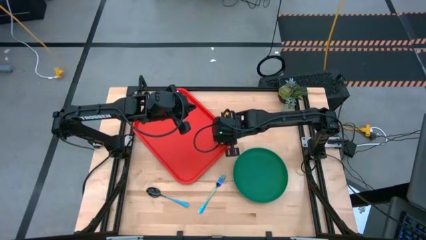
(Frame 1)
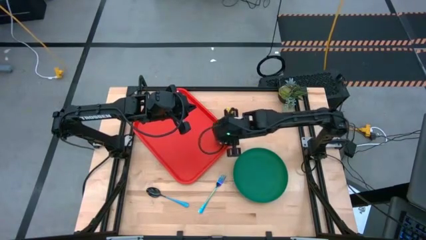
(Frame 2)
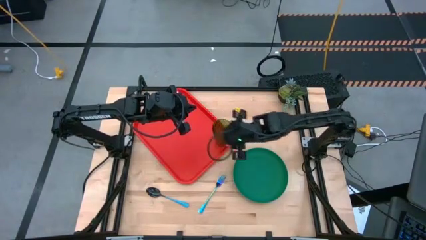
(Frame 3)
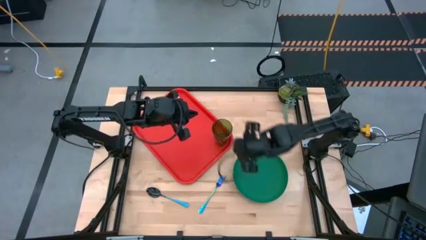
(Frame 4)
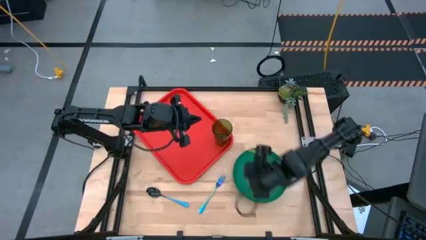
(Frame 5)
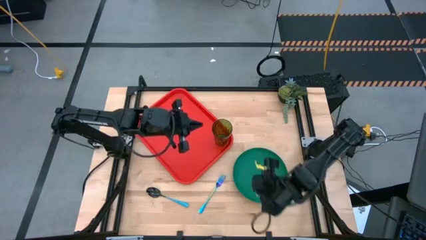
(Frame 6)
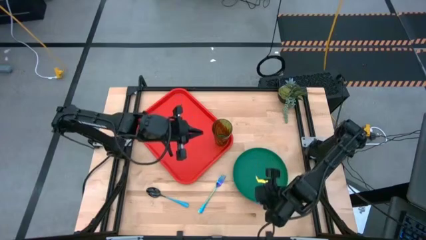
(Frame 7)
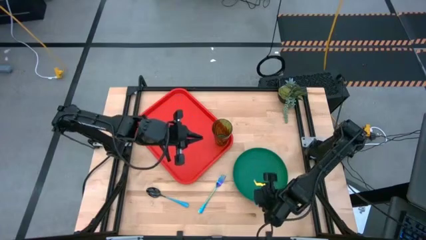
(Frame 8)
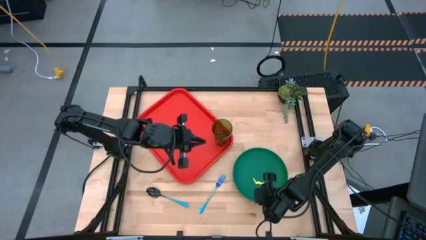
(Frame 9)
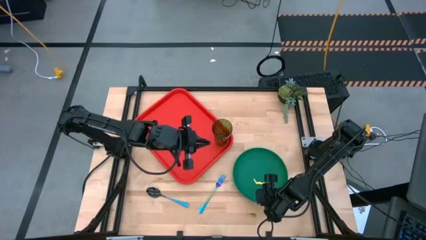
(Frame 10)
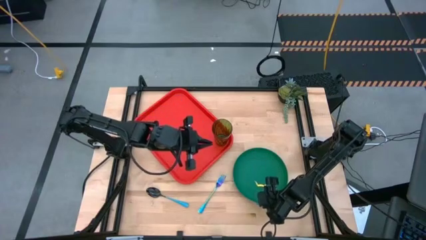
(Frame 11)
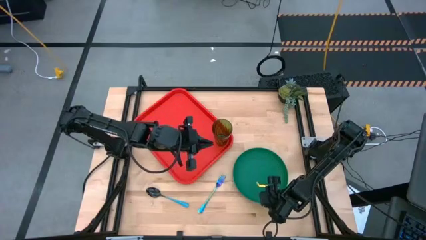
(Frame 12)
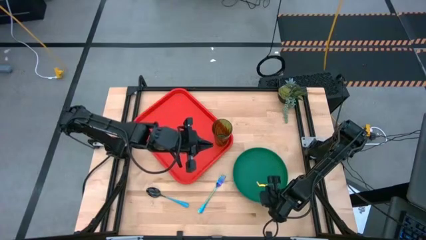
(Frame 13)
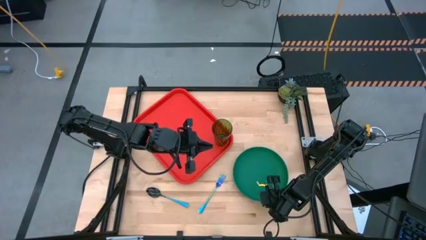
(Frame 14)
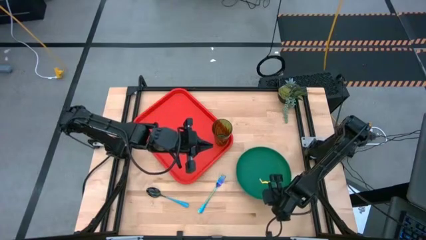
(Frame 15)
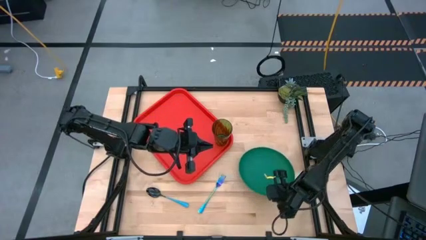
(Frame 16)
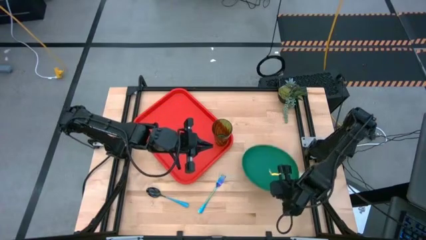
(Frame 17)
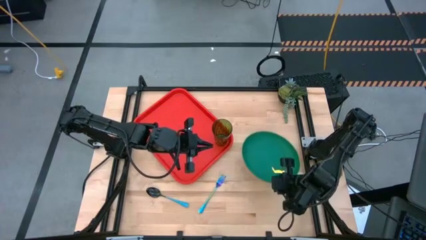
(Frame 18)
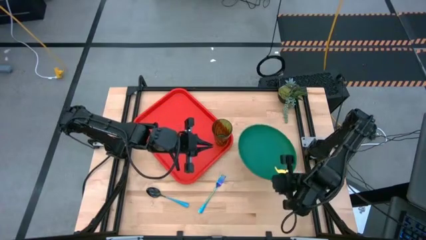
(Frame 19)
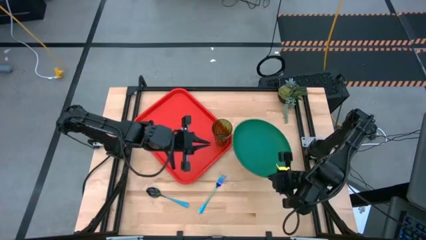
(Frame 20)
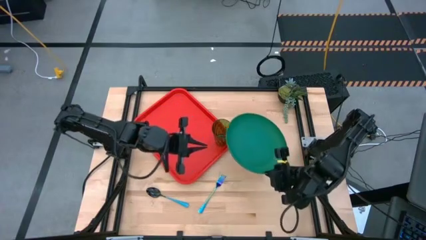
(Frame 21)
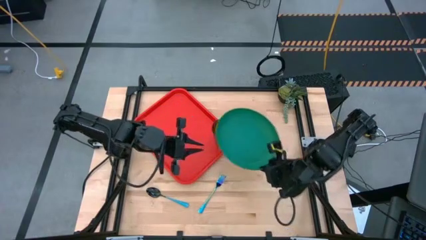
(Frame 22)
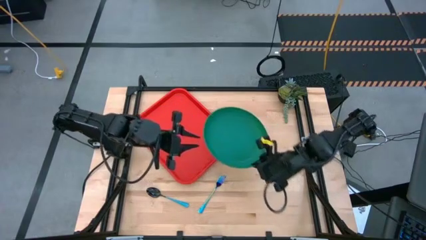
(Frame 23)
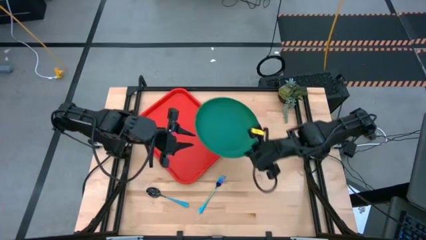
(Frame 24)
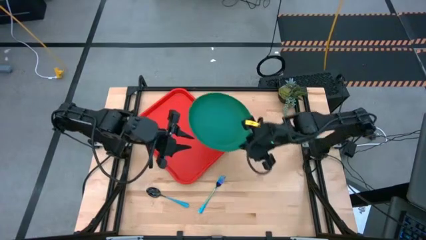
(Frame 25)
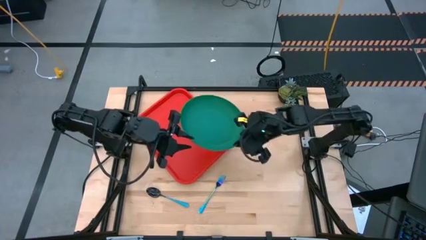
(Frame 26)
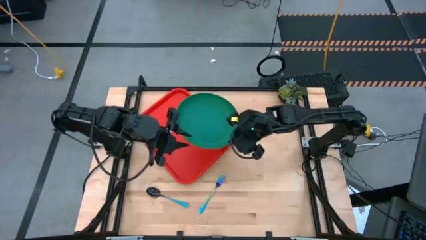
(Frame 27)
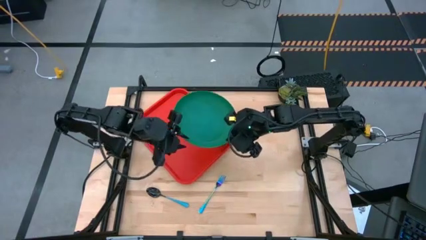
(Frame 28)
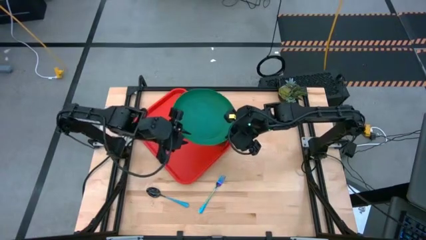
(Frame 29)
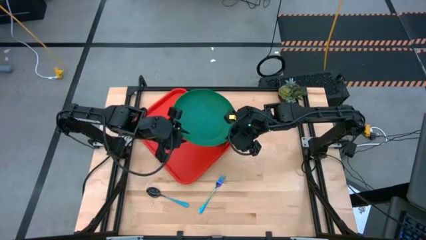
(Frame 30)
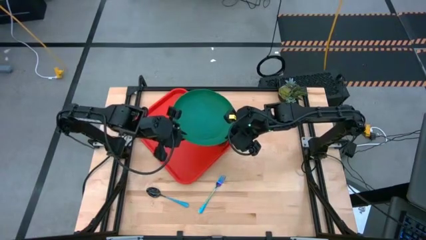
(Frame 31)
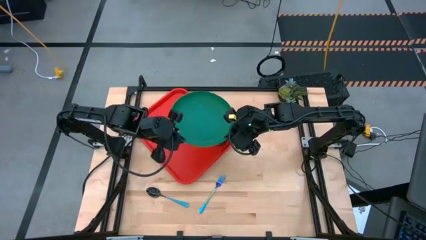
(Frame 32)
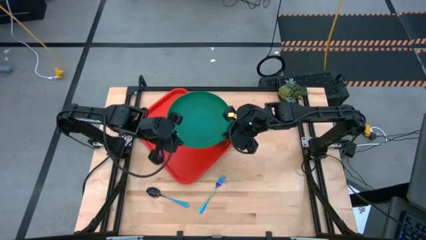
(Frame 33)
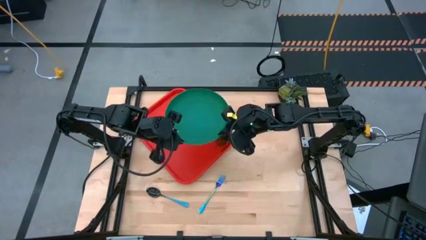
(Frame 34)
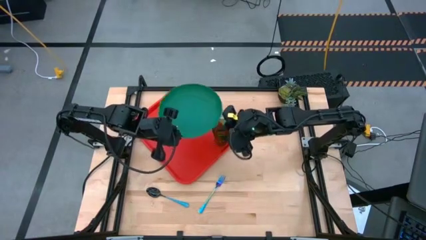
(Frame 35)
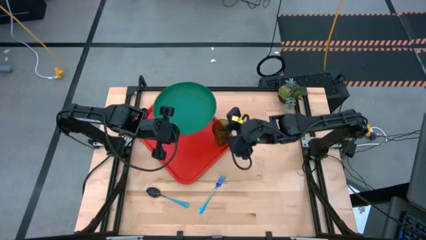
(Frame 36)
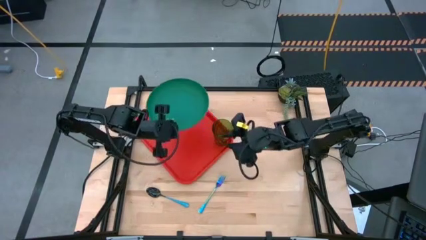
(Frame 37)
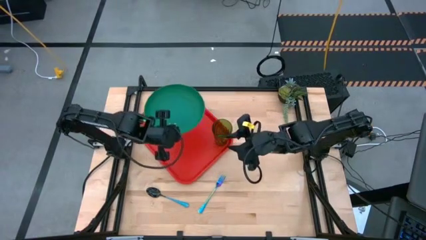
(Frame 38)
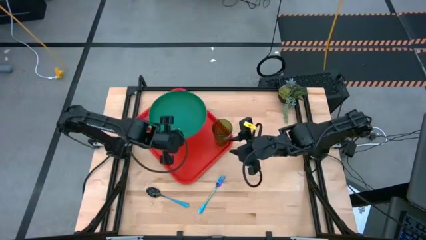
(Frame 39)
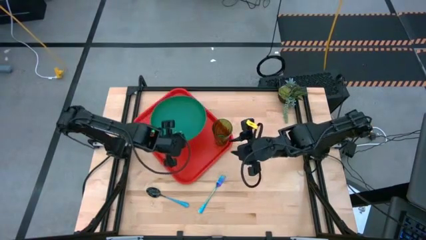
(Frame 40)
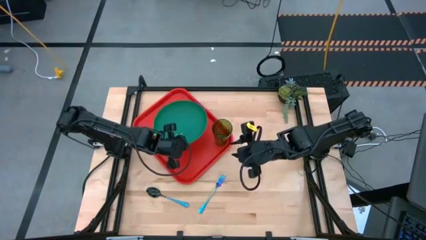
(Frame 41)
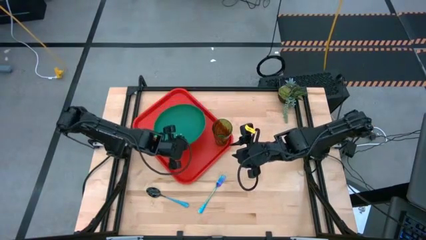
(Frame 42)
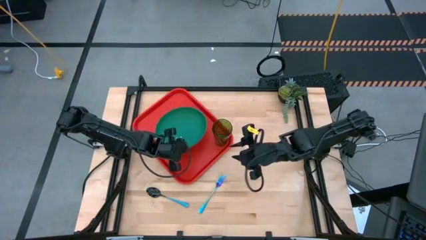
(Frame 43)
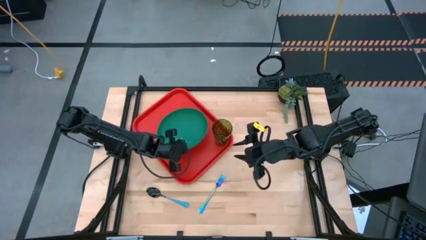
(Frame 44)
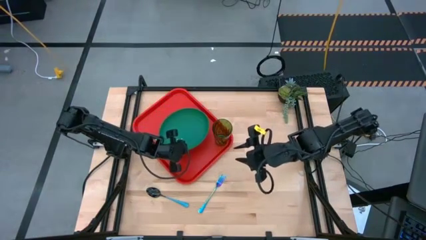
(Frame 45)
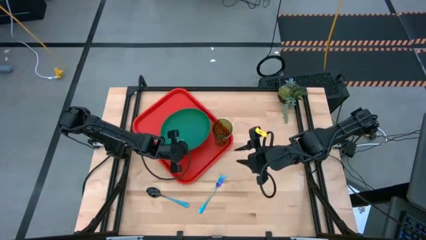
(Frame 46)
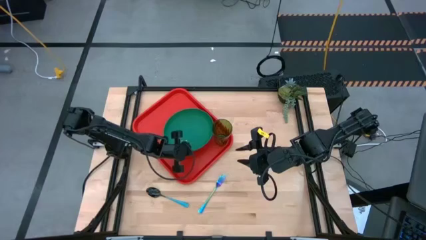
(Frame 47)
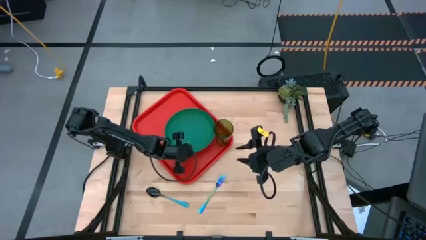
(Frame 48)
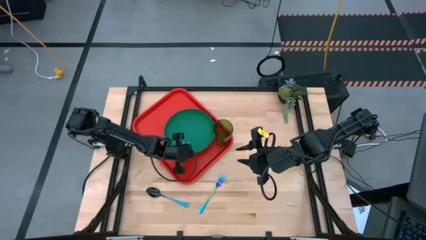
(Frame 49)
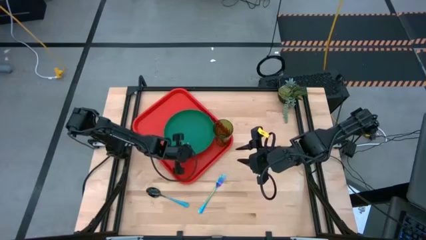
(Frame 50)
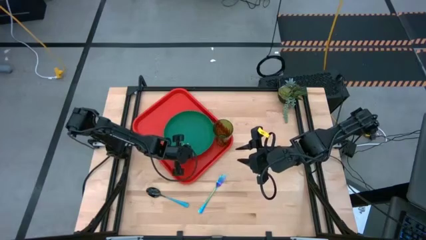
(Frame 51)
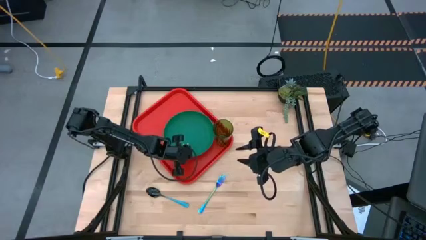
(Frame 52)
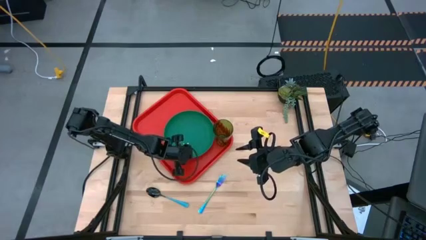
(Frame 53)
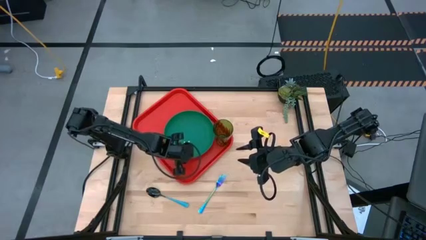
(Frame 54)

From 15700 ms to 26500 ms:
Task: Pick and place plate/cup/fork/spoon on tray
Put the green plate on the red serving tray to the left of the green cup

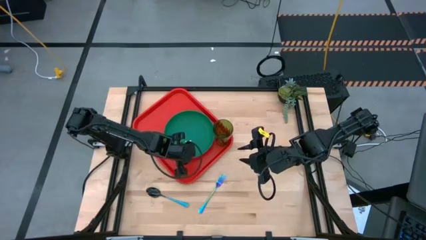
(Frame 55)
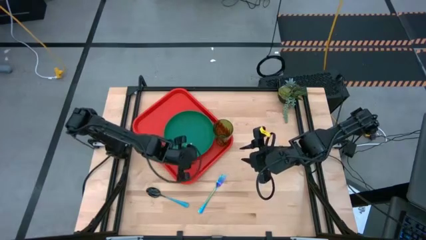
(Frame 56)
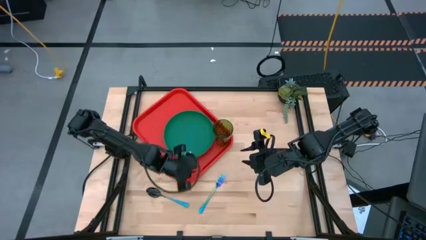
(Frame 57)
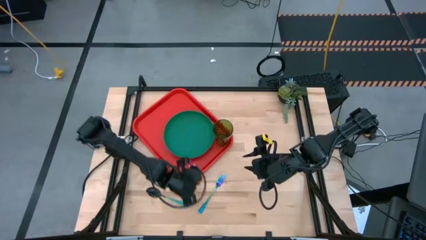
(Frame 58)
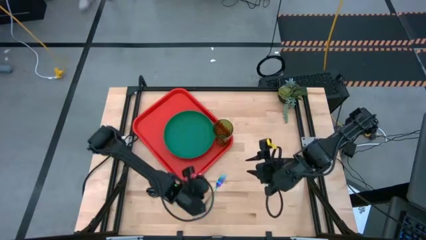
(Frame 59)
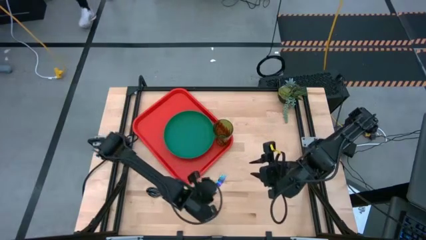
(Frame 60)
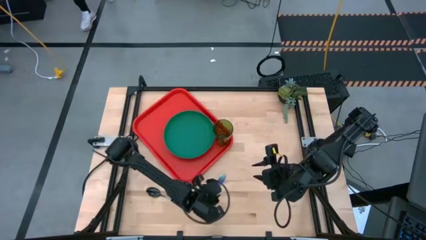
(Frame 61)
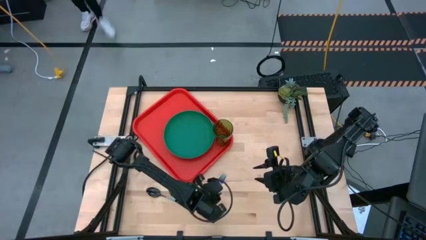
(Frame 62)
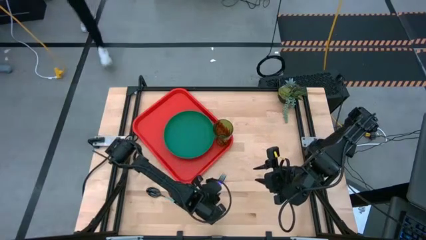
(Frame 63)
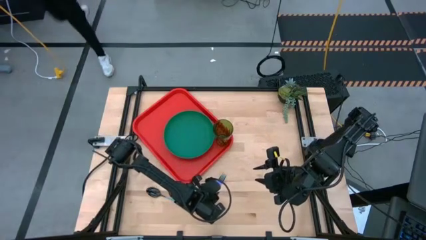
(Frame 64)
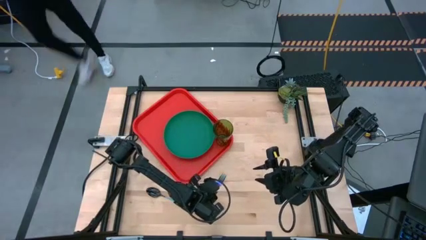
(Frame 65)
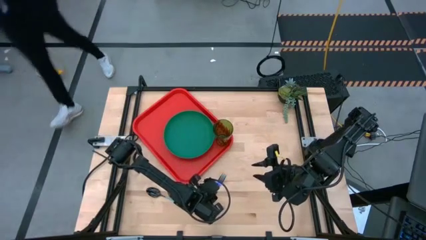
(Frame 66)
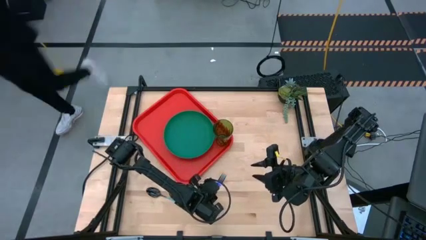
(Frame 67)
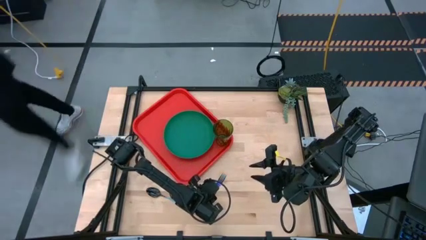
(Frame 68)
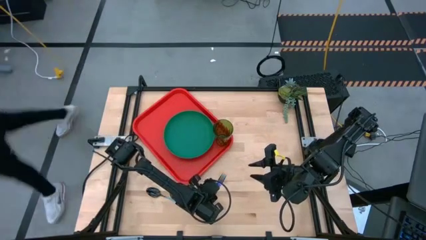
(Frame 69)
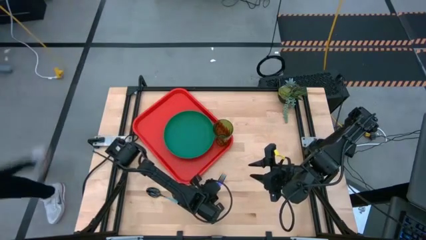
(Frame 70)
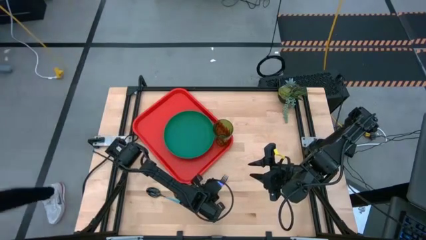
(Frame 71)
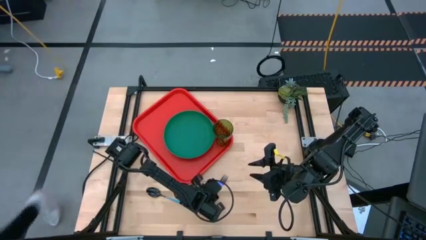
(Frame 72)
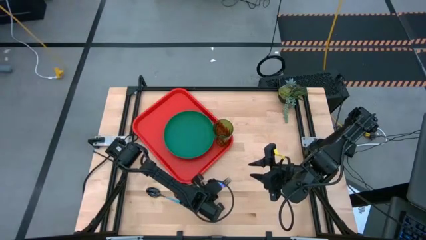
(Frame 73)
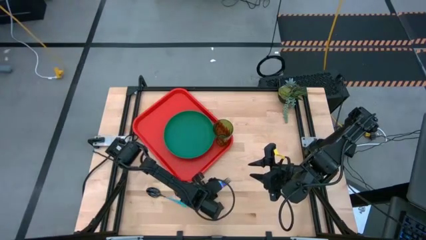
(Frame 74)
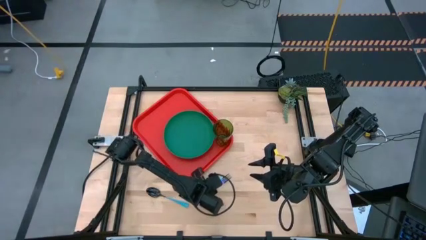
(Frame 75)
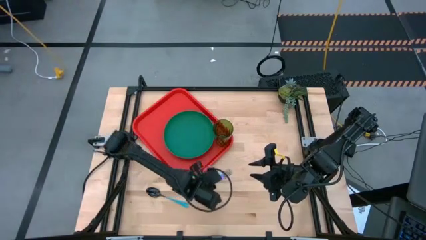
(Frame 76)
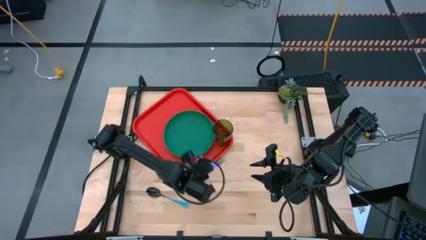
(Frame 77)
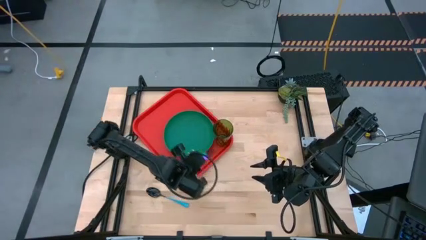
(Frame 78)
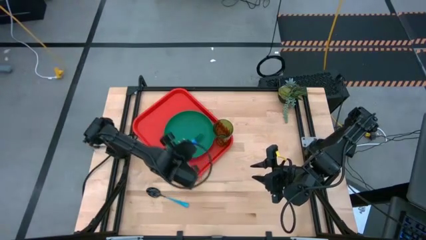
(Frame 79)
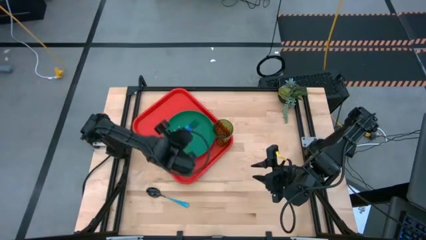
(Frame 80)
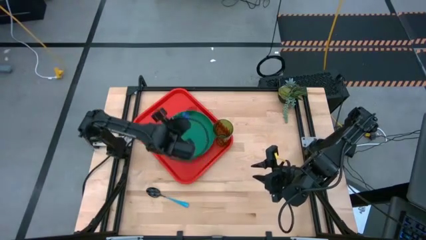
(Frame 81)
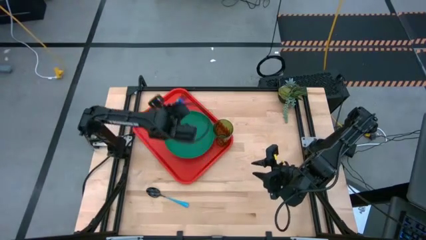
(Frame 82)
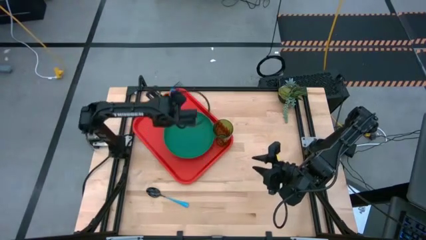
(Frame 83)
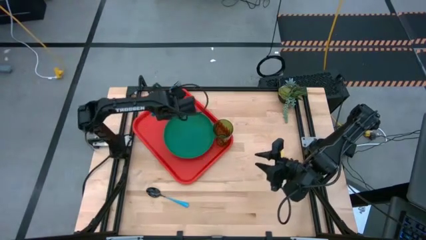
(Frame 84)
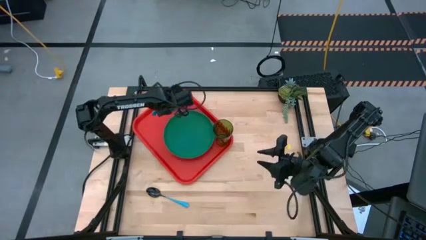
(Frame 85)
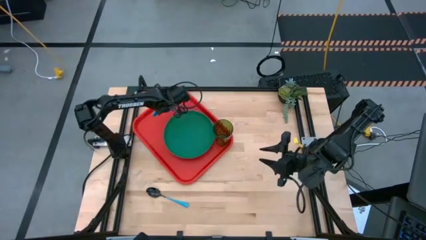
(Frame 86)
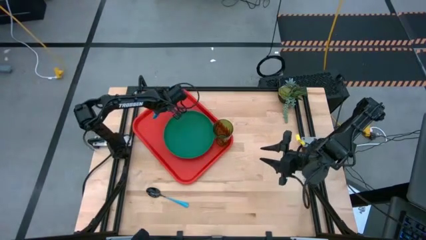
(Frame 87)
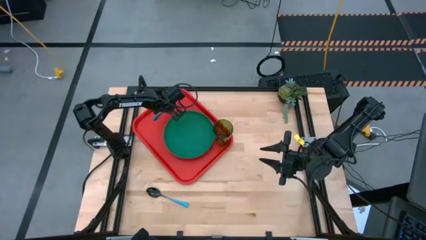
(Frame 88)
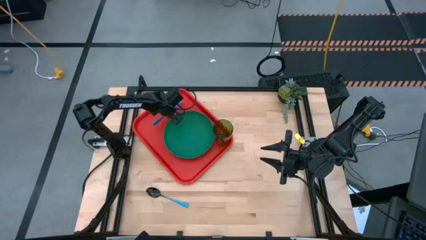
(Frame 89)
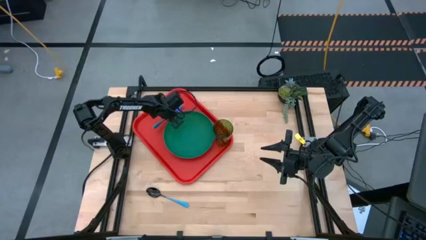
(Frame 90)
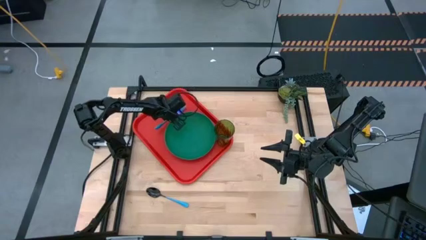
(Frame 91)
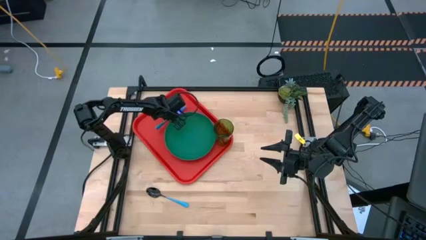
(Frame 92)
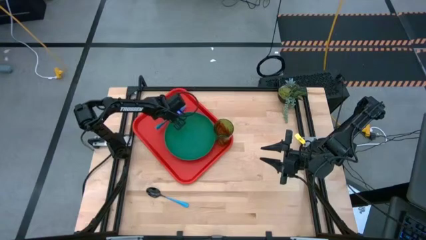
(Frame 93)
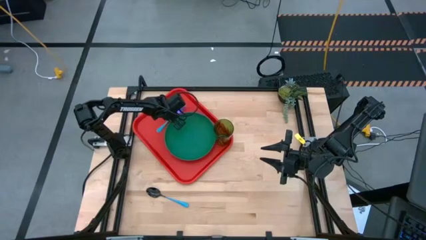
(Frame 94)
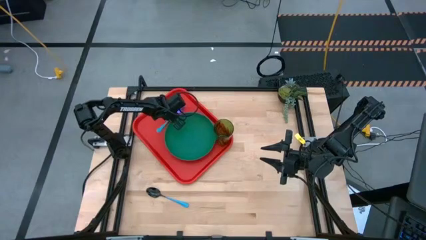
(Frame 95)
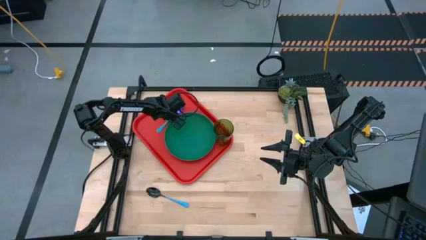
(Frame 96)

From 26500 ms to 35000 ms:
Put the purple fork on the red serving tray to the top right of the green plate
